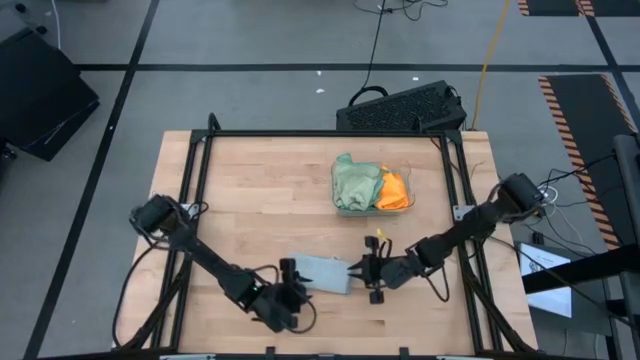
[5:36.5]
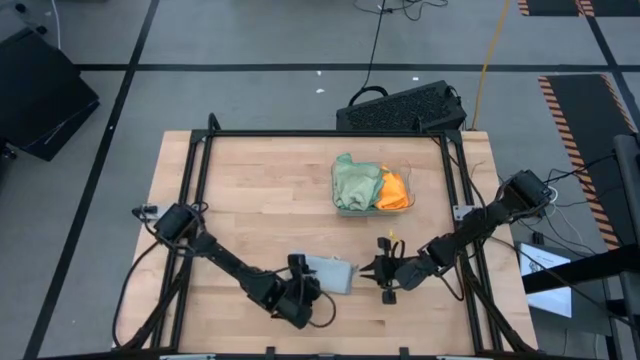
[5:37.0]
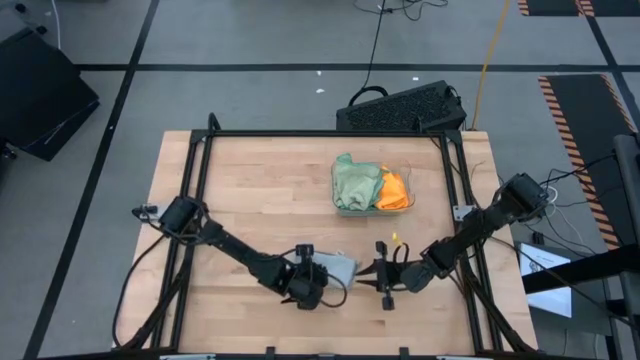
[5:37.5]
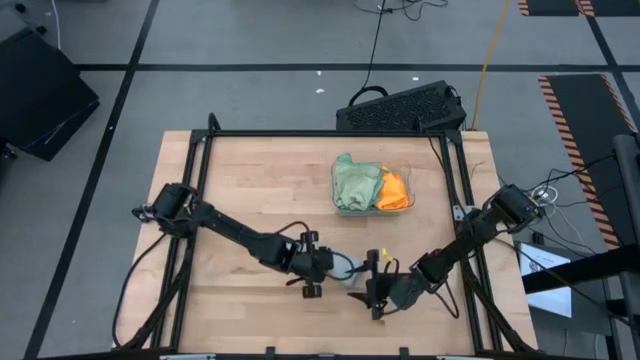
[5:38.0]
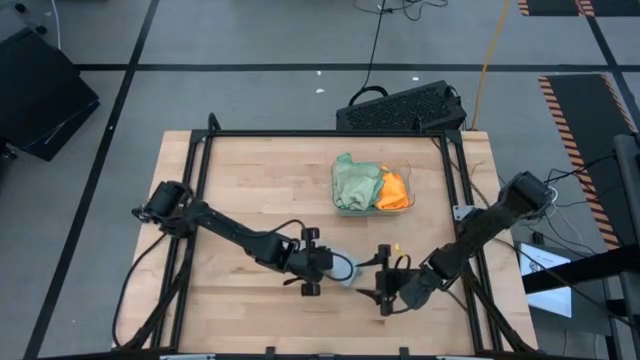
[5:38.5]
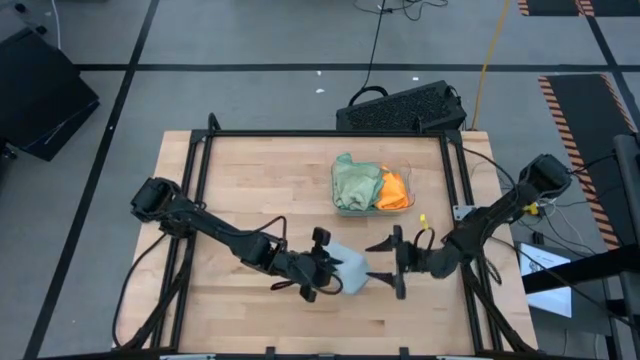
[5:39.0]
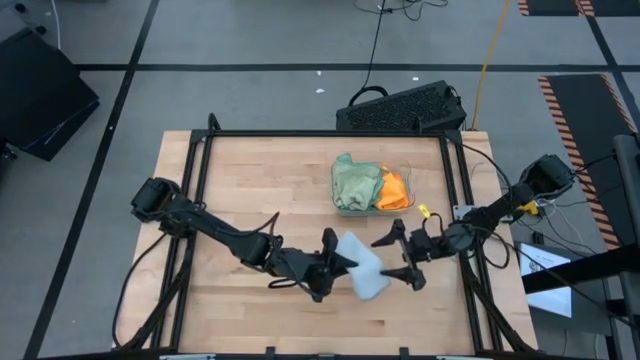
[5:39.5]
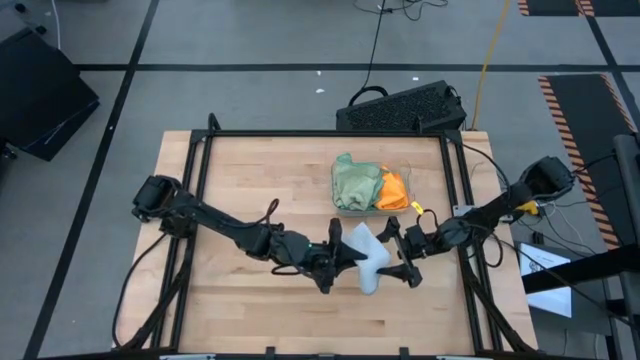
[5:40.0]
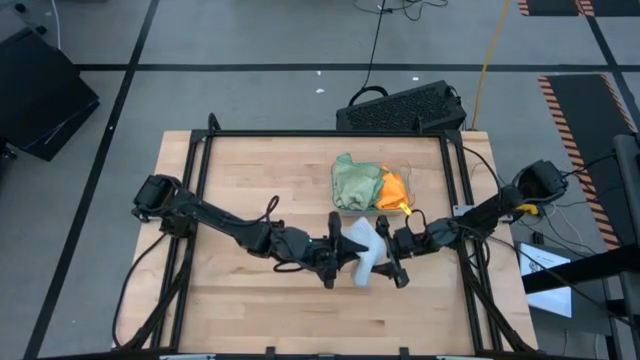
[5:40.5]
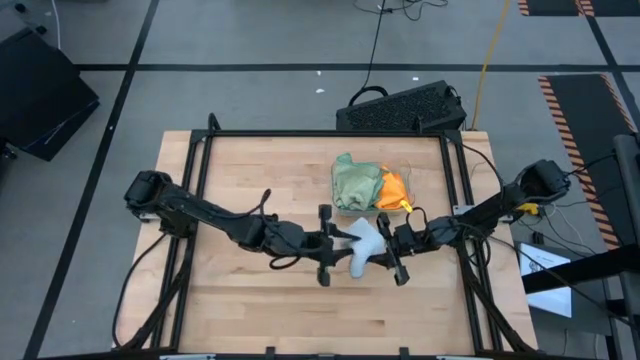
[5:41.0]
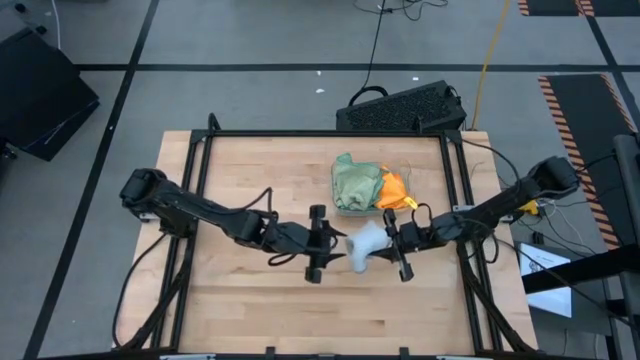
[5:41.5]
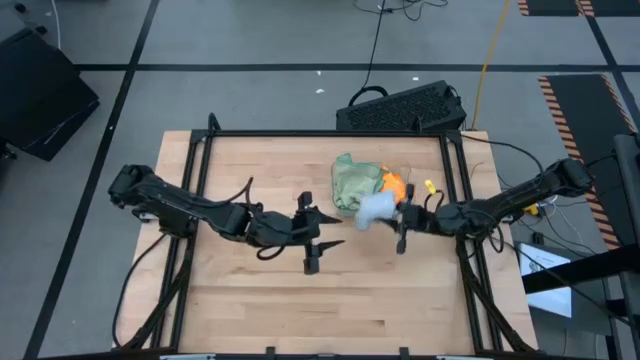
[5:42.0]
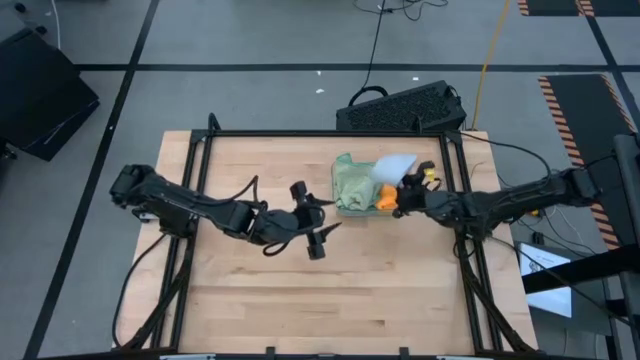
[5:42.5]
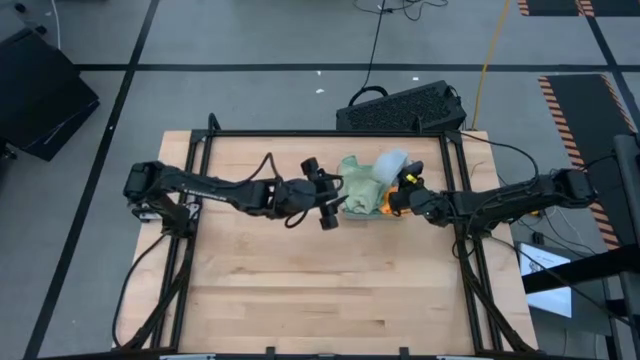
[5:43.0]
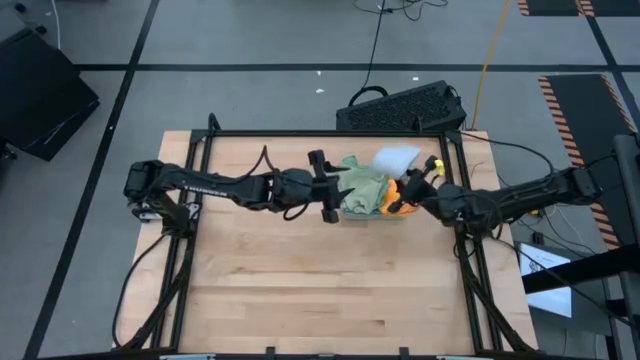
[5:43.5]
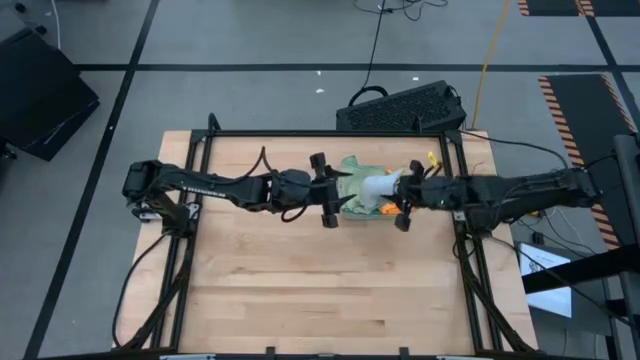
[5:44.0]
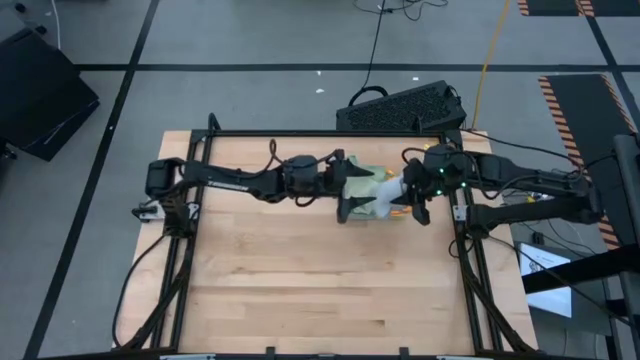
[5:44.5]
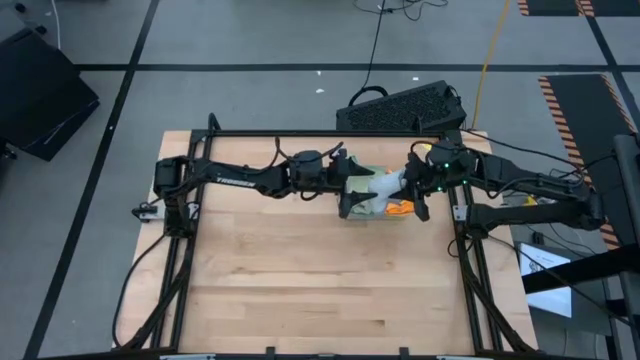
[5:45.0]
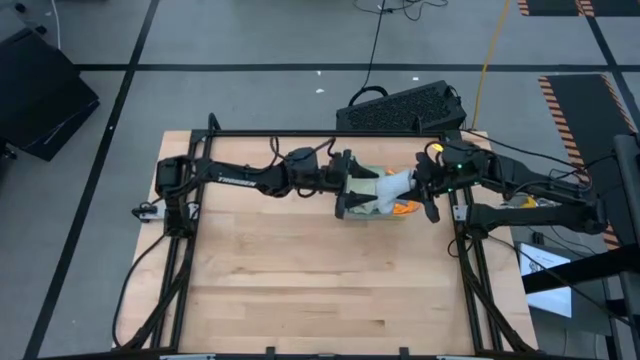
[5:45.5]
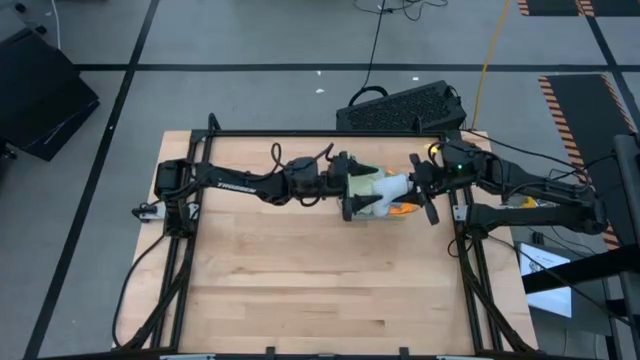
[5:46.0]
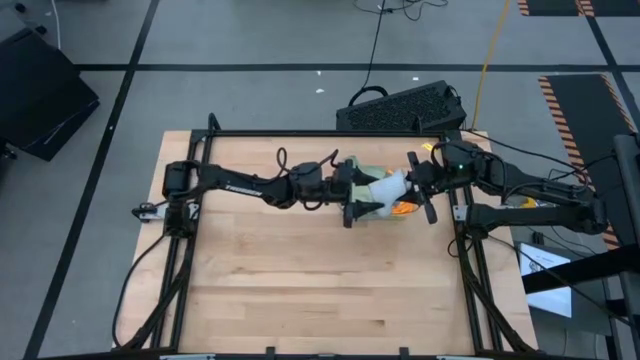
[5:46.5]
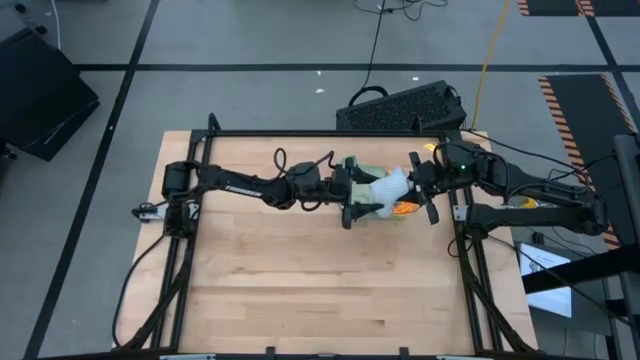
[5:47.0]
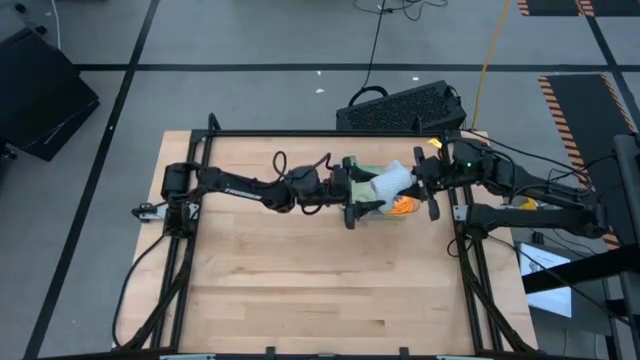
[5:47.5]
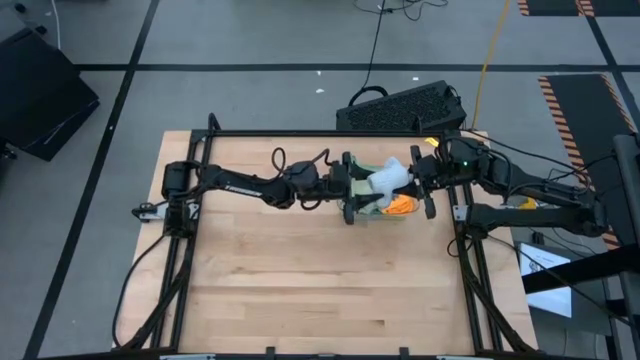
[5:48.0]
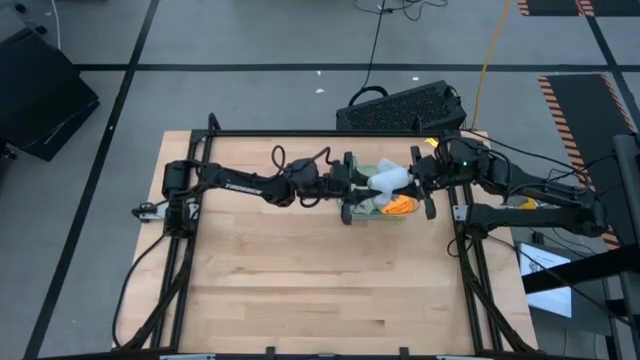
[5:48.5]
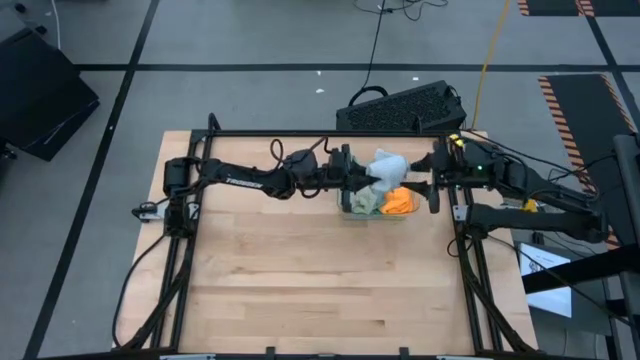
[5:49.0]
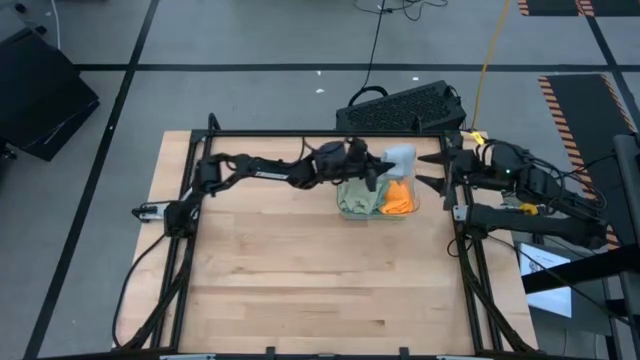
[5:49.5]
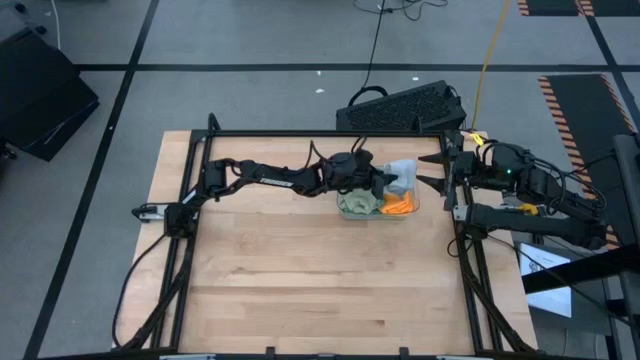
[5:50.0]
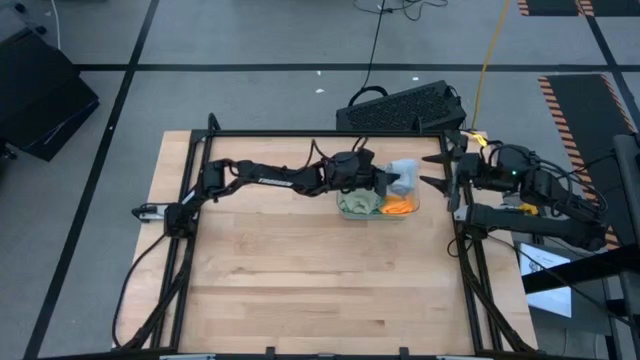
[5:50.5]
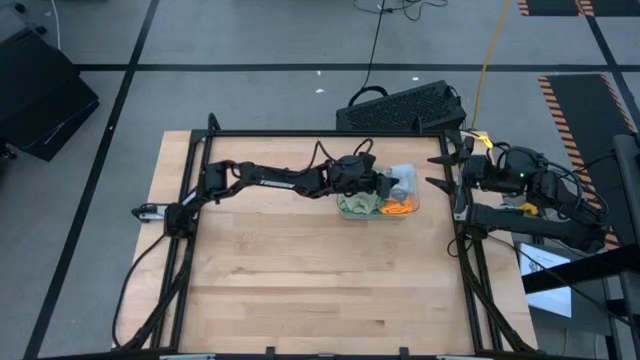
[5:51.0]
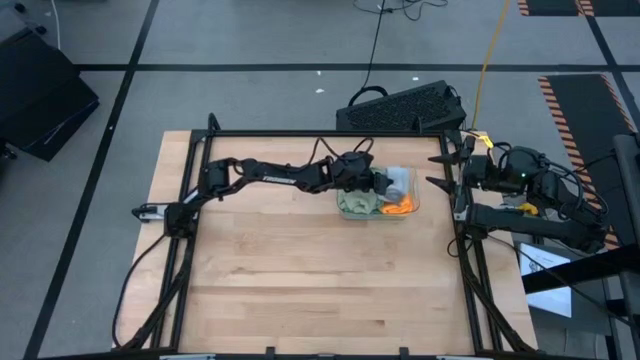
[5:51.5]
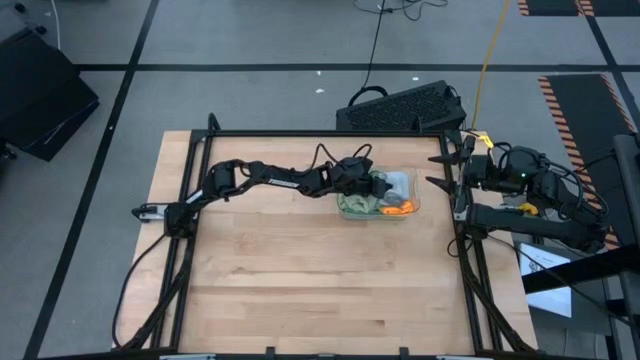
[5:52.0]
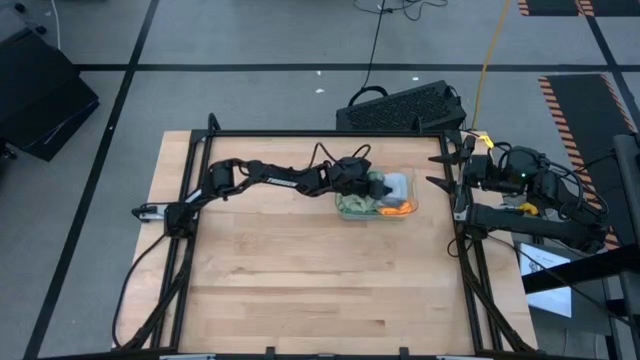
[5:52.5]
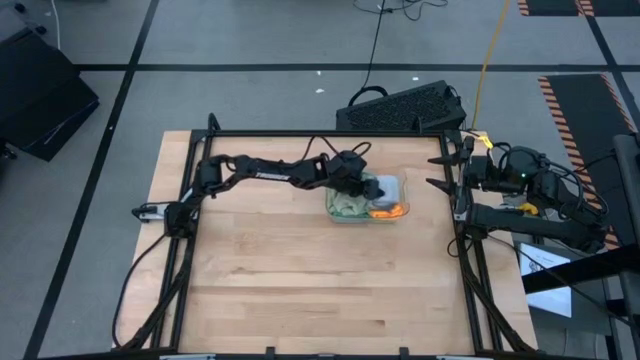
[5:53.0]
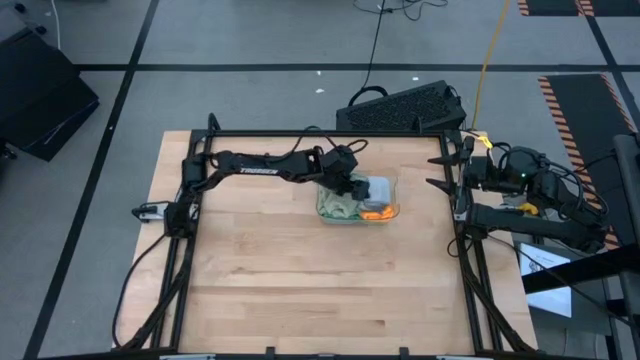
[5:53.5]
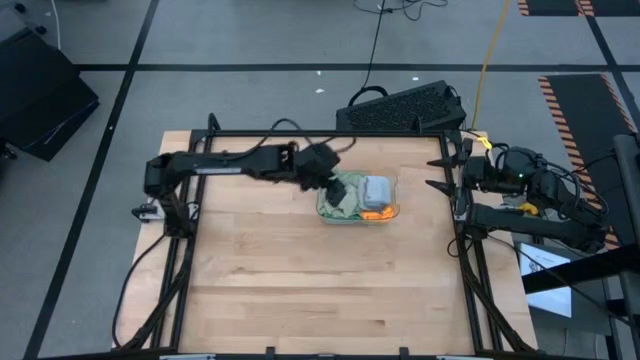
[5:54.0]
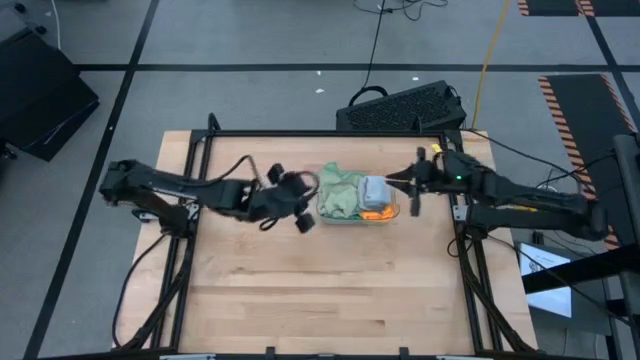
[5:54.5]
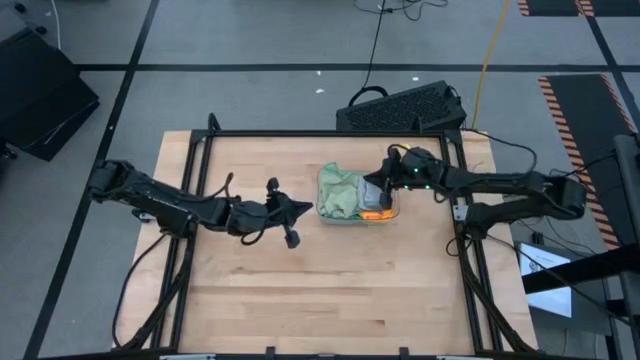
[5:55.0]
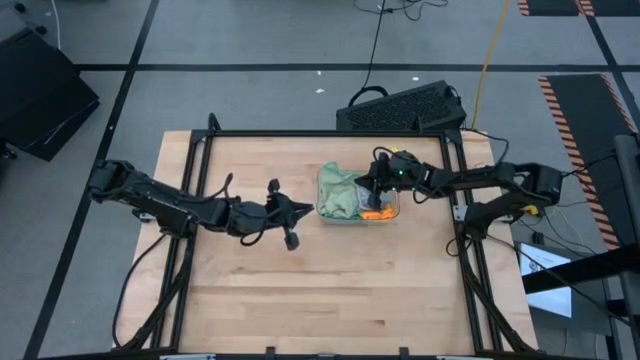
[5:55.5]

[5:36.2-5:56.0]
Task: Fold microfiber towels
Put the folded gray microfiber cloth into the transparent bin

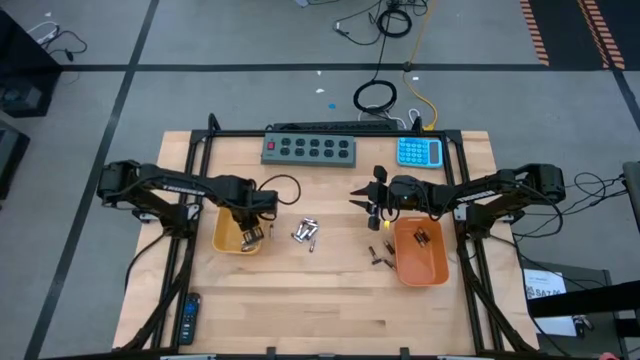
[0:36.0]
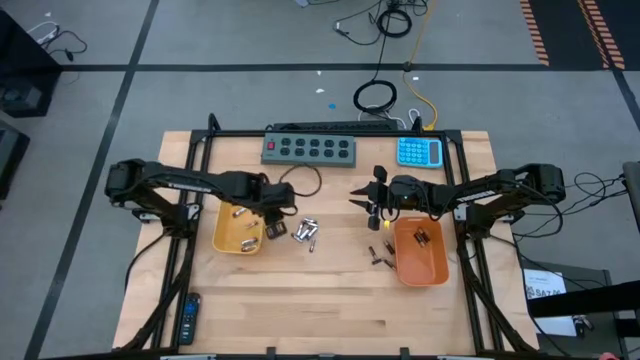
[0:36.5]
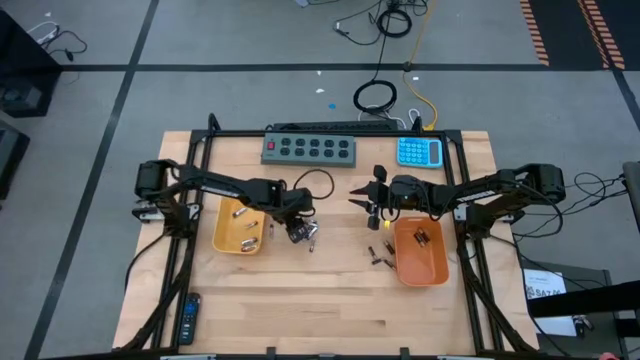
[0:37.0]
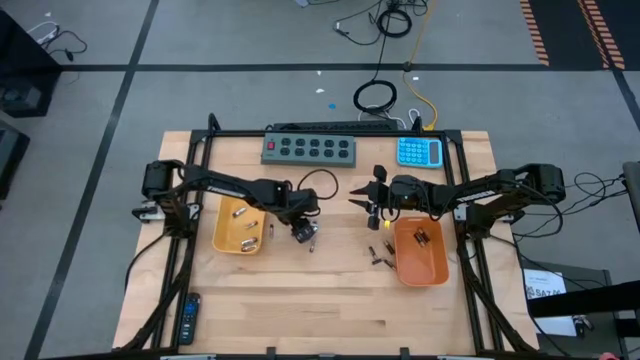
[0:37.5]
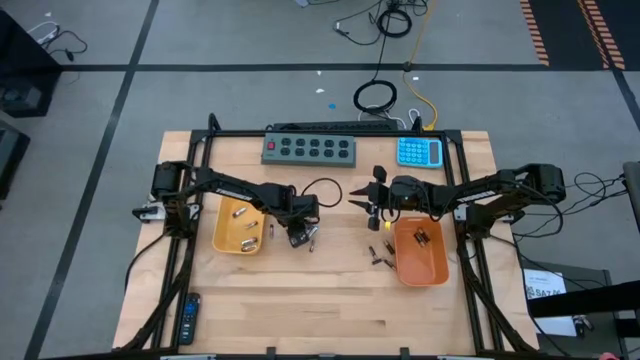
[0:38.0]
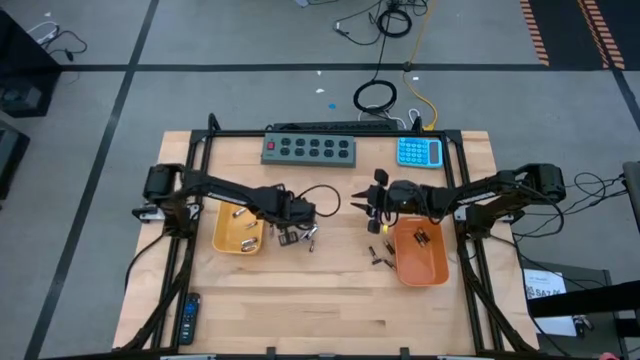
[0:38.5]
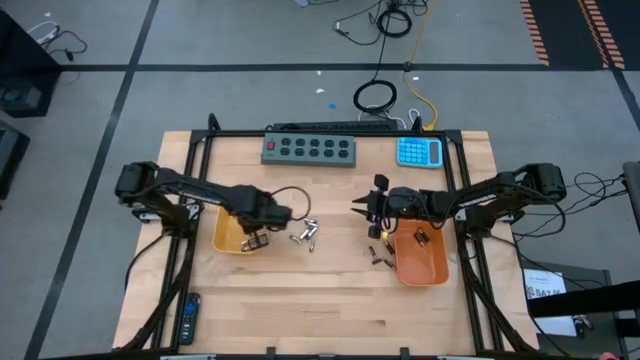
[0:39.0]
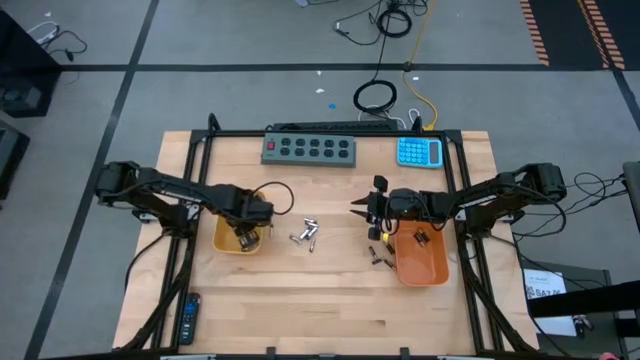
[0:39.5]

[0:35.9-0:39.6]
Task: Sort batteries
Put the silver battery into the yellow bin
